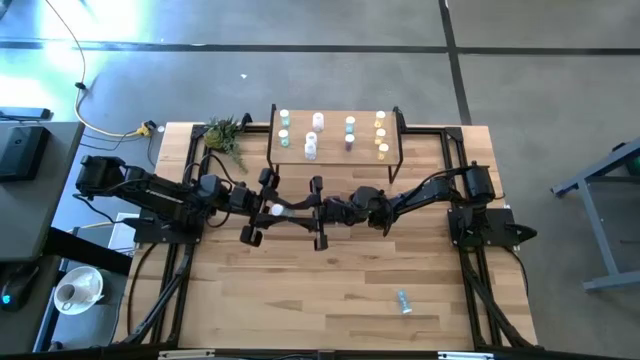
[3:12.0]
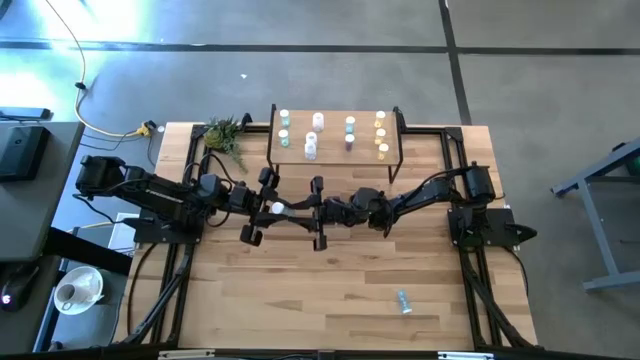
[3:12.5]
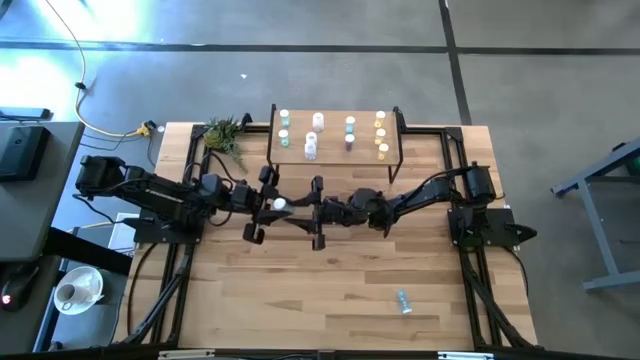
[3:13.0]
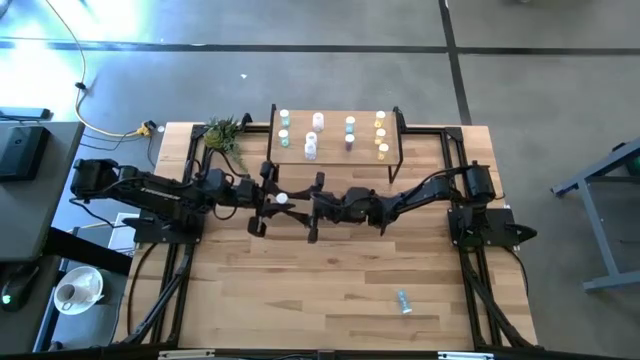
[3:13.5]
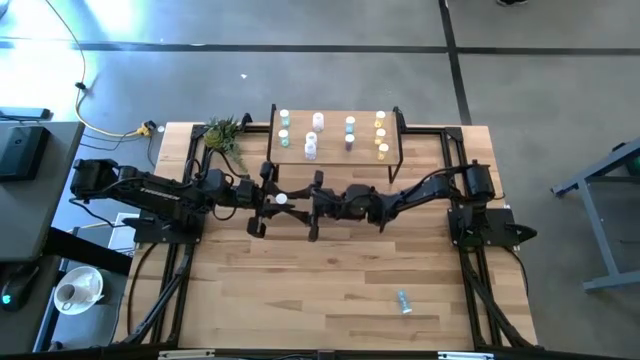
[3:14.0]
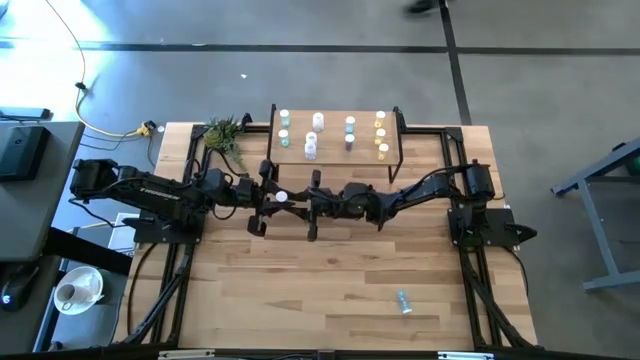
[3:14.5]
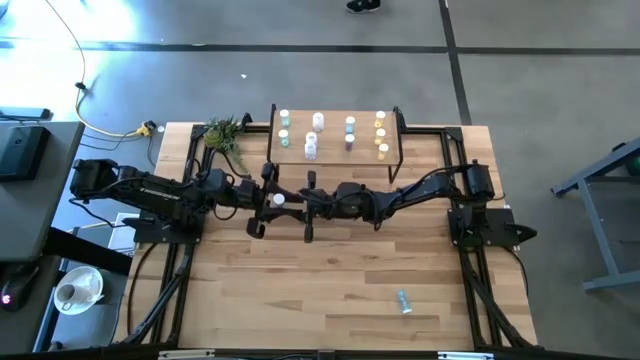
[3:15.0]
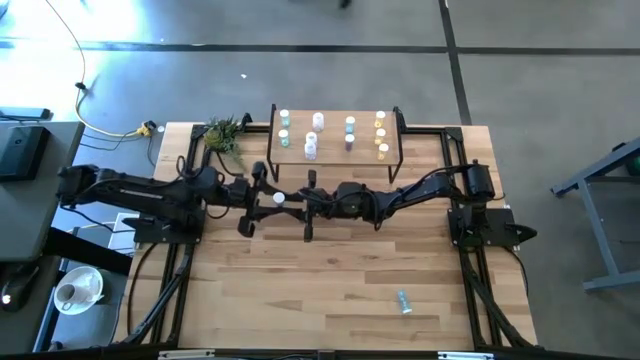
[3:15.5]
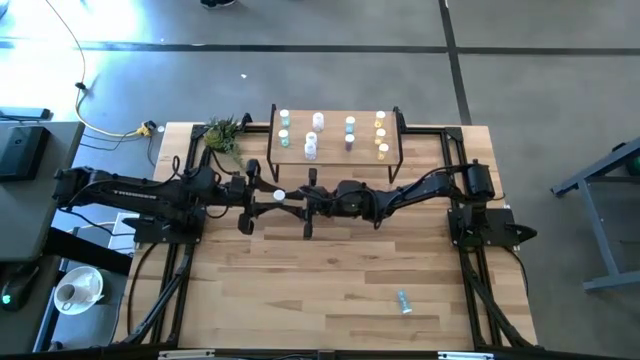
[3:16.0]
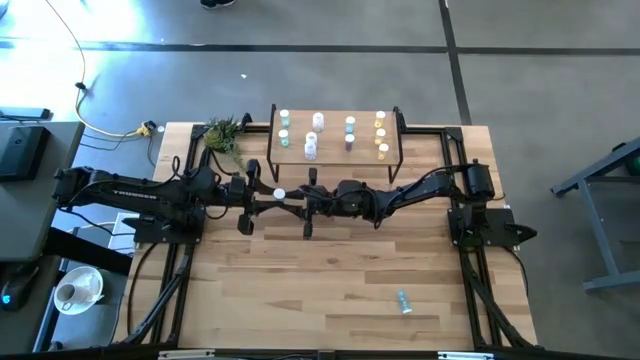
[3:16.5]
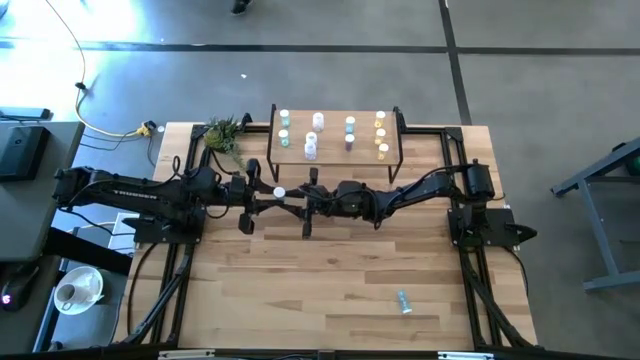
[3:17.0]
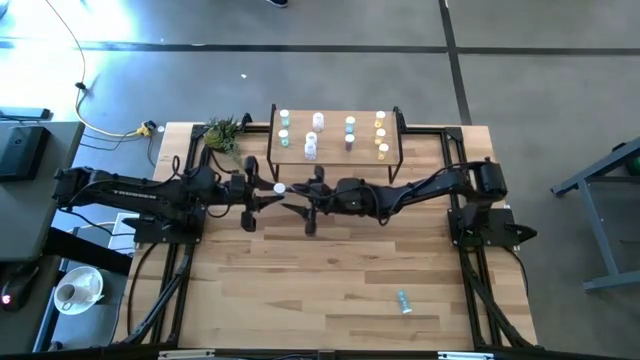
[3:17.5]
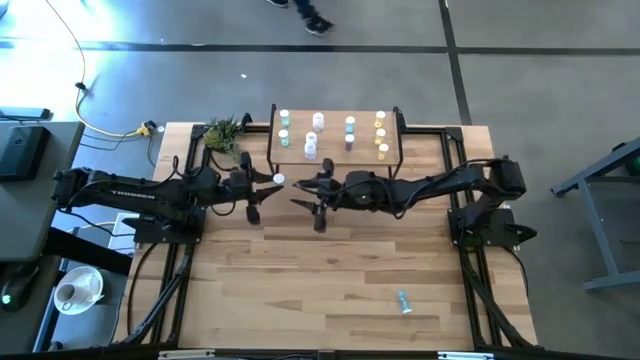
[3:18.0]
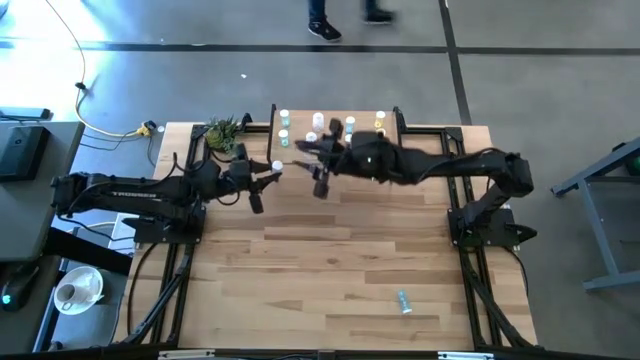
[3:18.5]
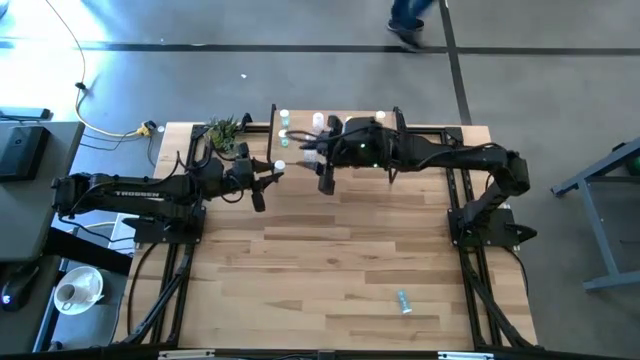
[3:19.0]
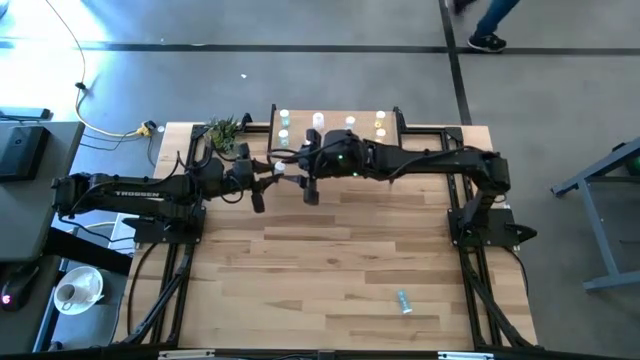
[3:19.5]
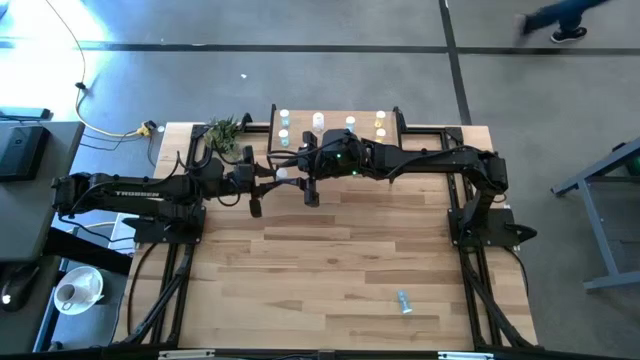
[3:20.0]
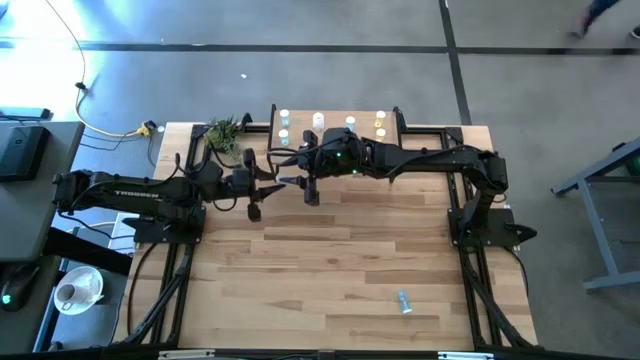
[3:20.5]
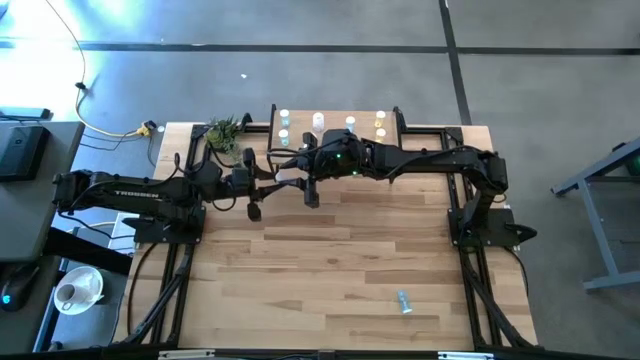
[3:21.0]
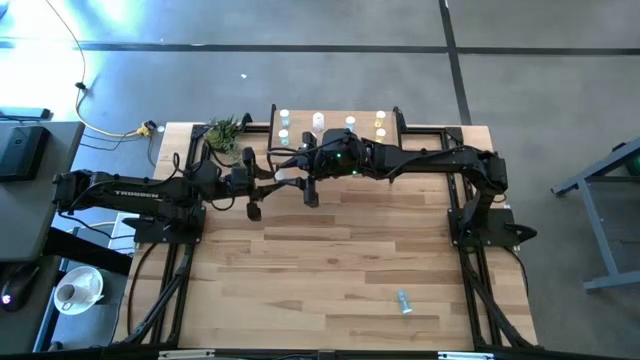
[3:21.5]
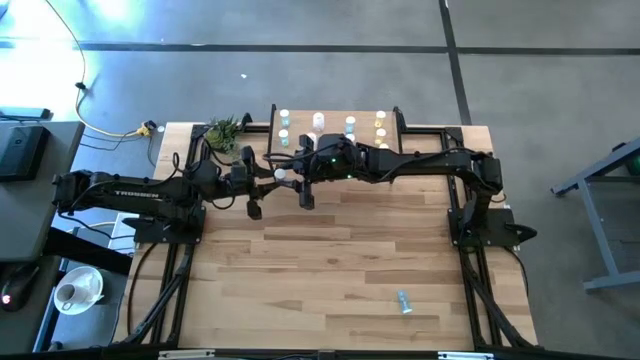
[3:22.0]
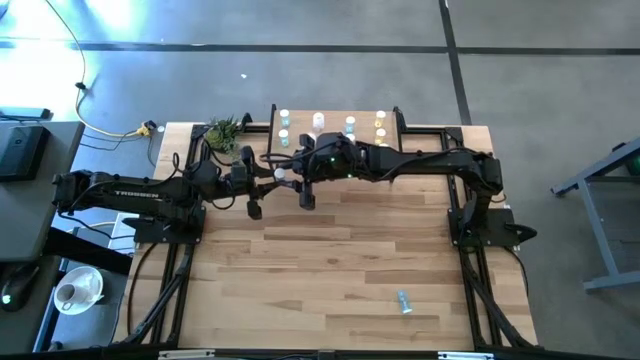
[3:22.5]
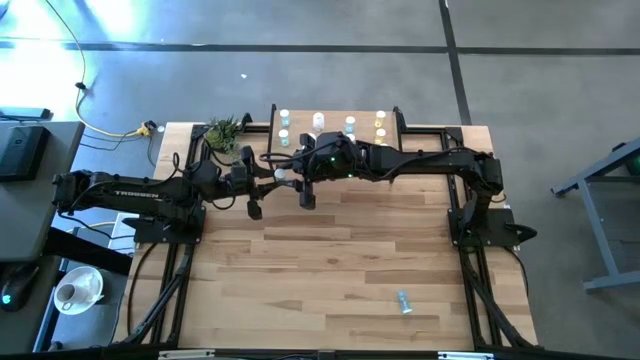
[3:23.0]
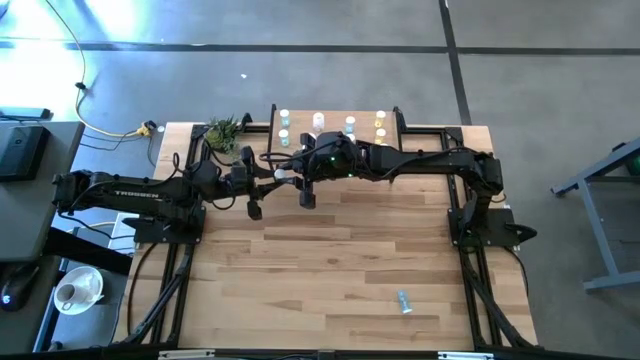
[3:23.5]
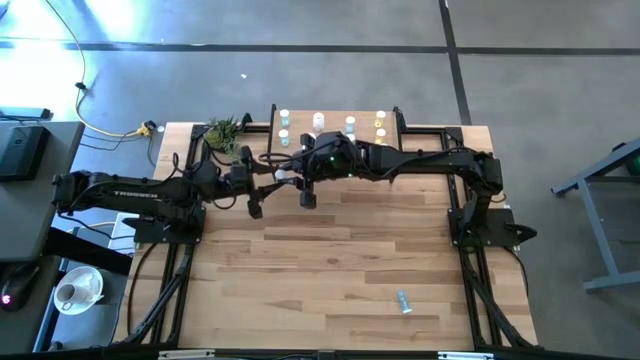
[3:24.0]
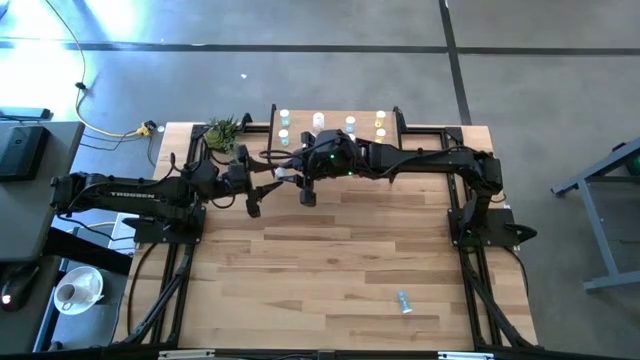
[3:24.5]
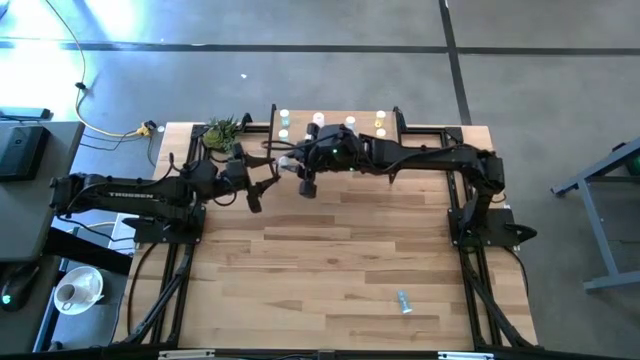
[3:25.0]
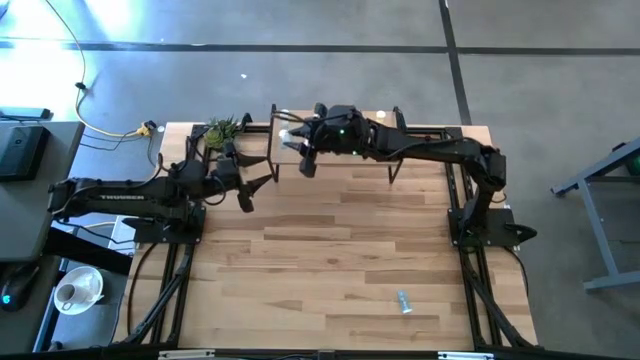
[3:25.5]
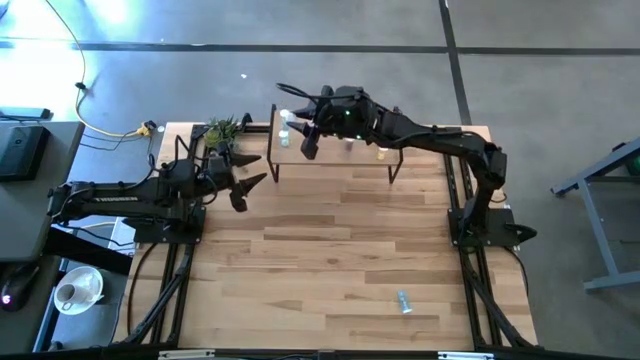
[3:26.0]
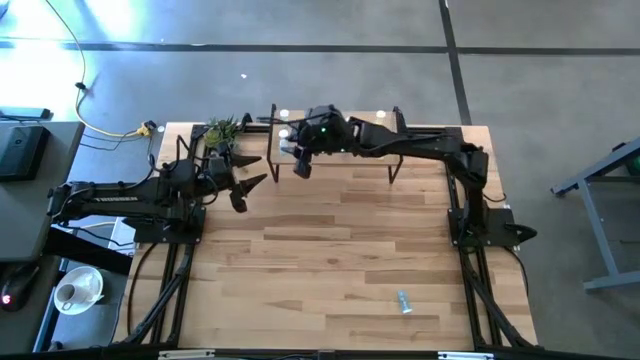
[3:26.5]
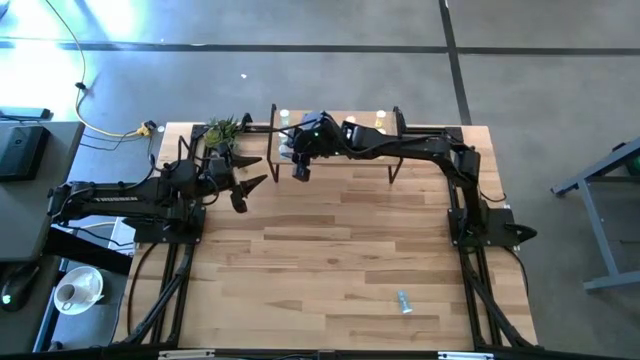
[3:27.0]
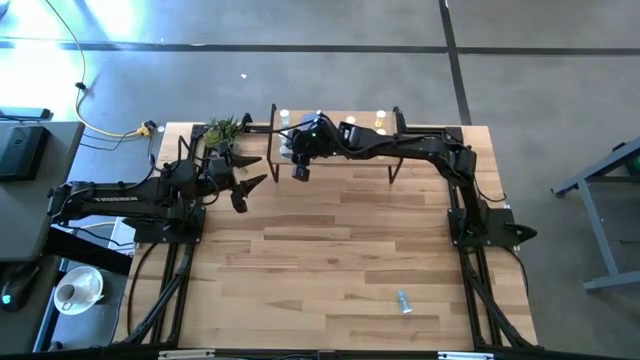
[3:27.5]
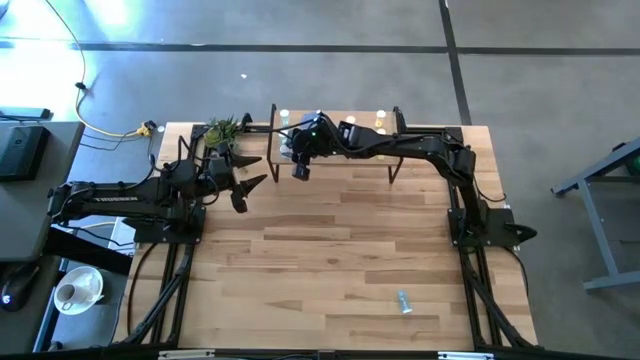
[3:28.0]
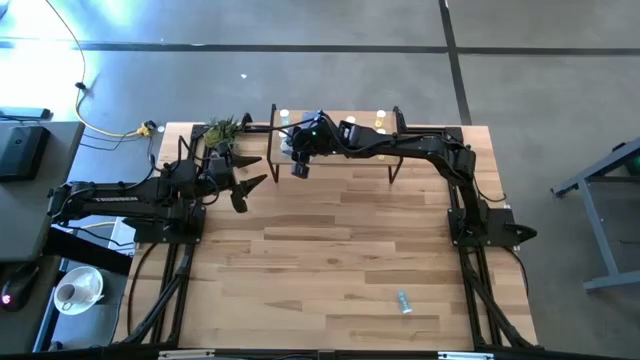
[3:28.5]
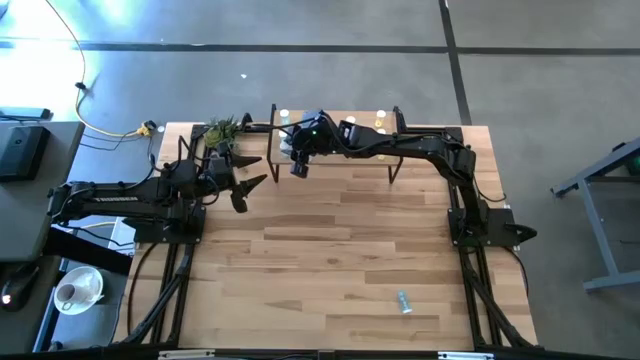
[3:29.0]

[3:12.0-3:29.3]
Task: Pick and place medicine bottles onto shelf by color
Put the green pill bottle on the shelf aligned with the other green pill bottle

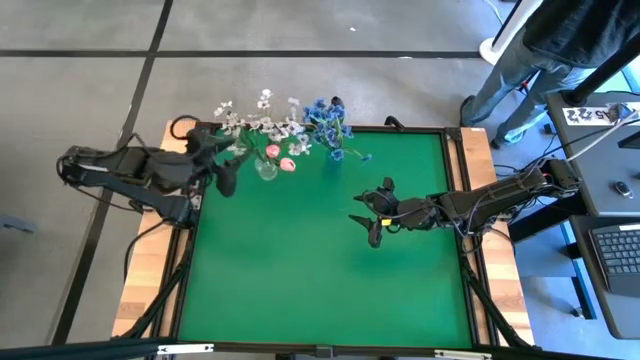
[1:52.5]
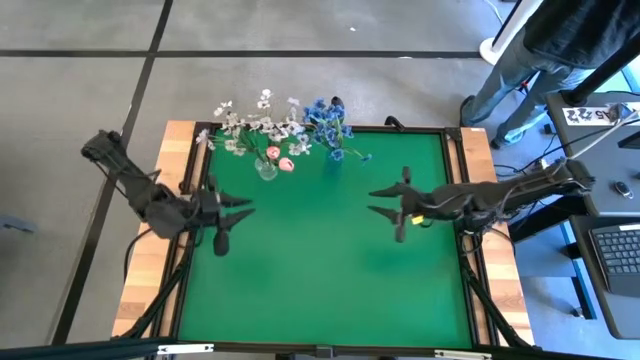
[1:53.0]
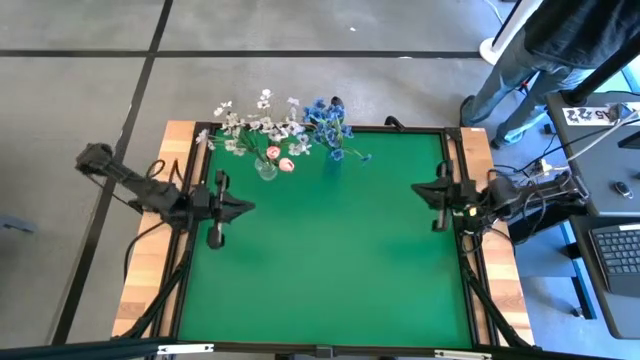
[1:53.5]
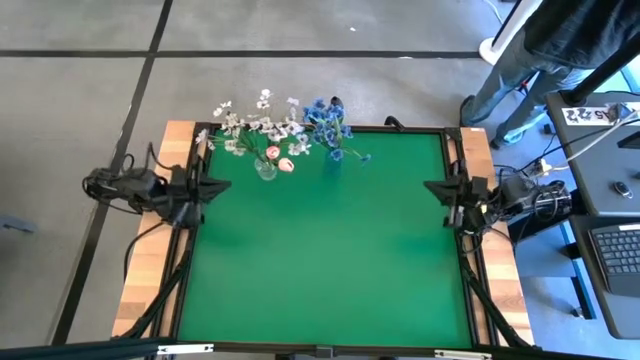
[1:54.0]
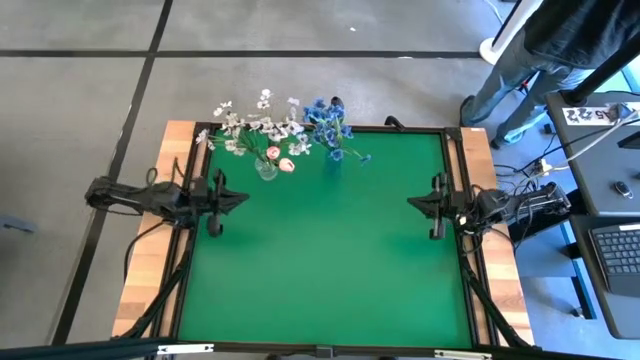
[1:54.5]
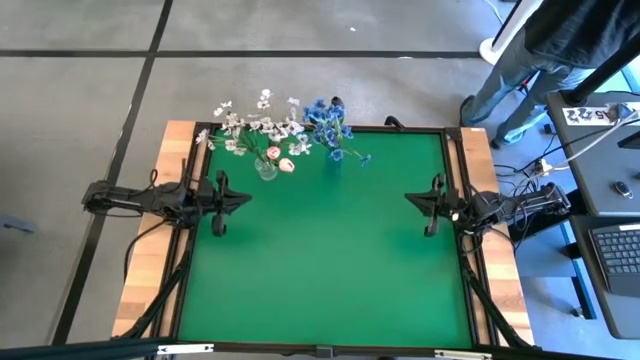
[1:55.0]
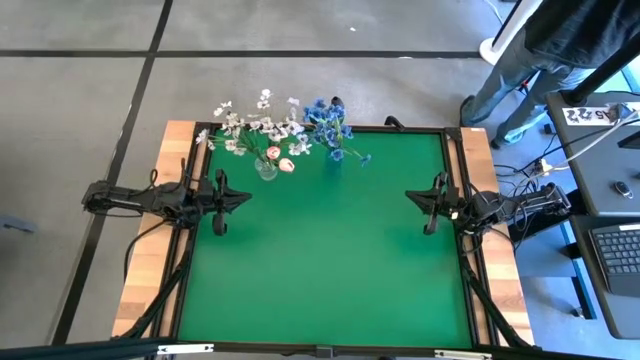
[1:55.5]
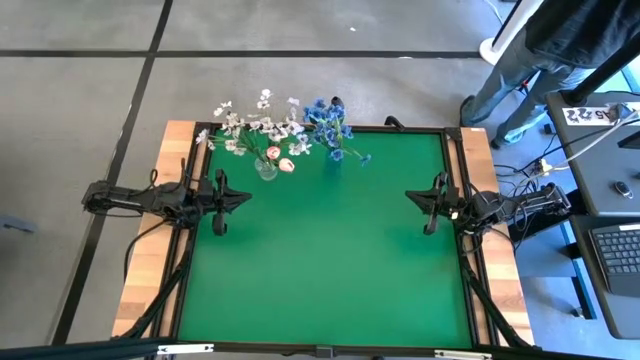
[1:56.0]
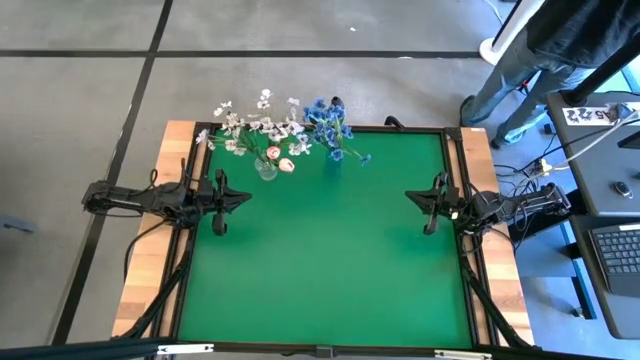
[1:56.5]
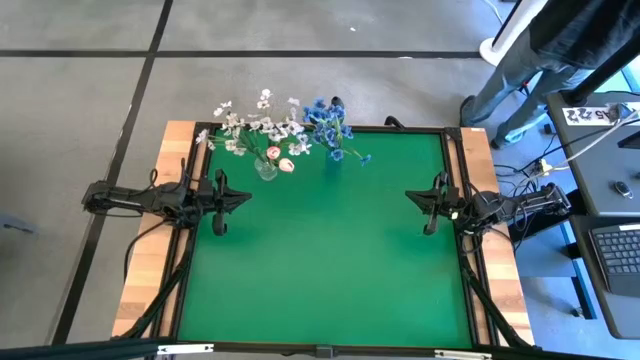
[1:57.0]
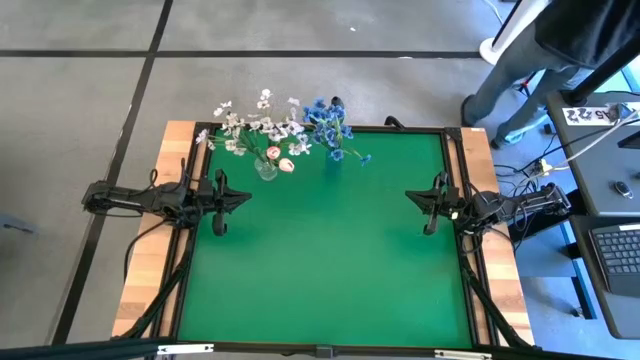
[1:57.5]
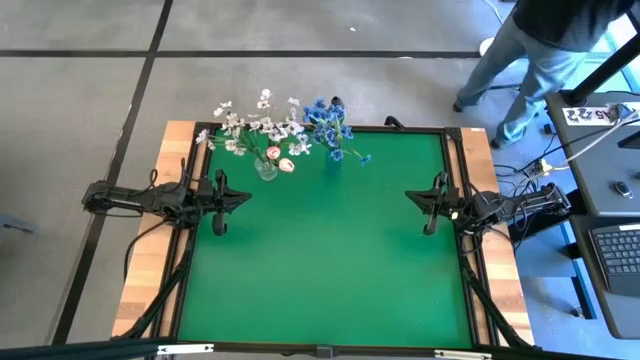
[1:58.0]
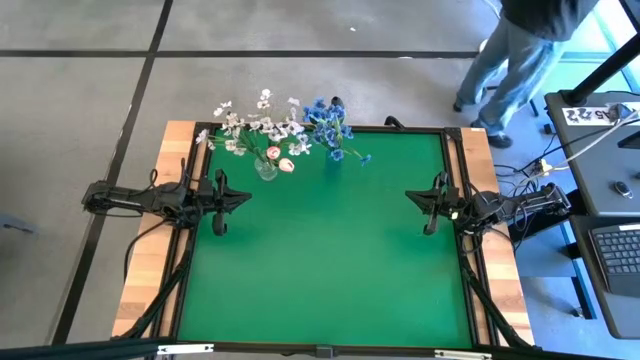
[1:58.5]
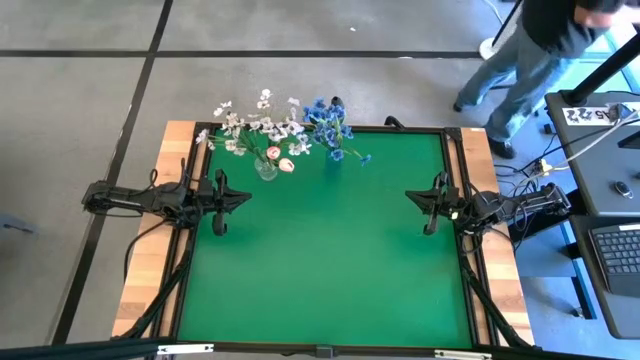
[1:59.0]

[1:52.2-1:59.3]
Task: Sort flowers into vase by color
Return to Home Position
